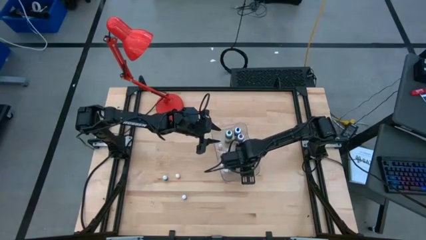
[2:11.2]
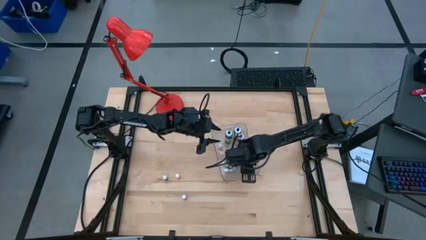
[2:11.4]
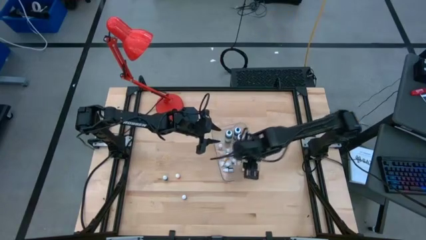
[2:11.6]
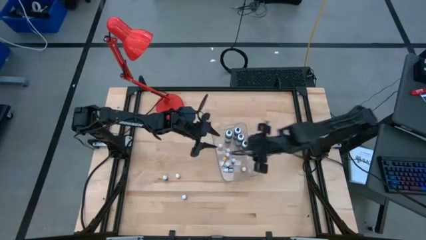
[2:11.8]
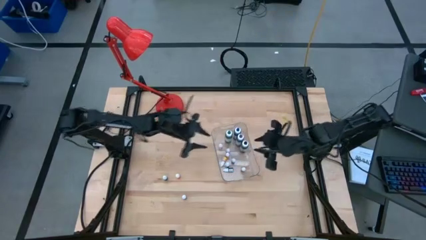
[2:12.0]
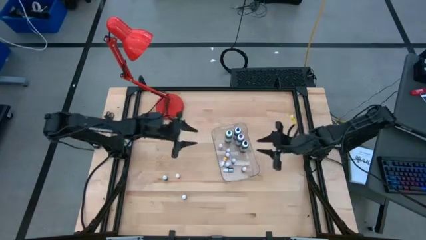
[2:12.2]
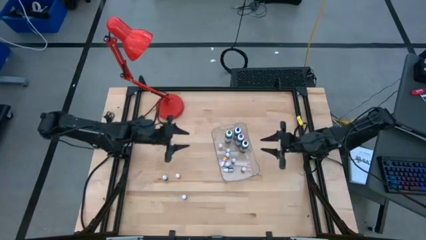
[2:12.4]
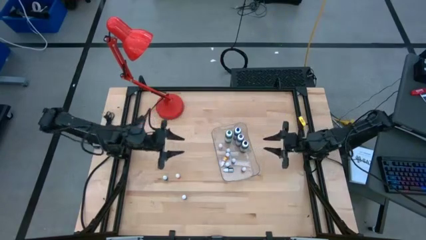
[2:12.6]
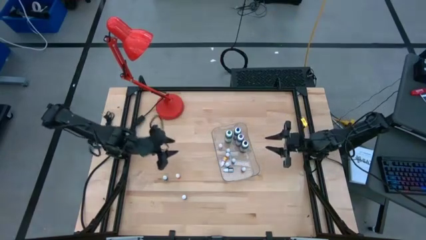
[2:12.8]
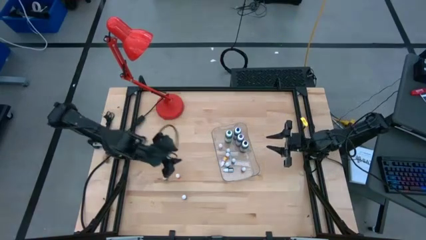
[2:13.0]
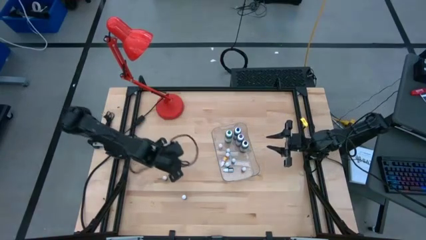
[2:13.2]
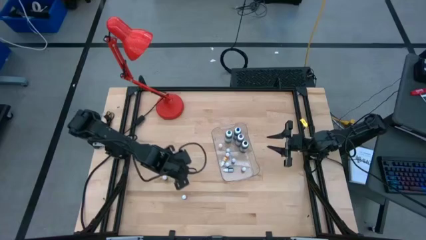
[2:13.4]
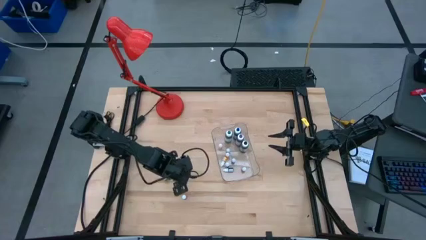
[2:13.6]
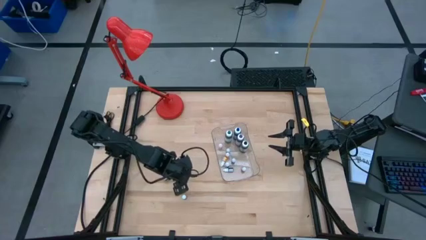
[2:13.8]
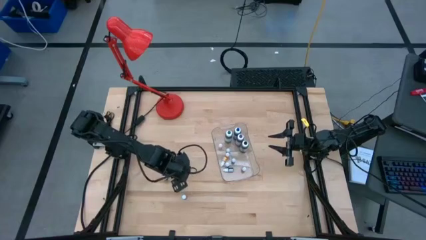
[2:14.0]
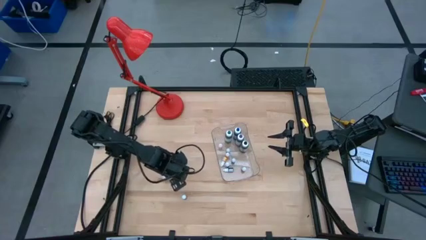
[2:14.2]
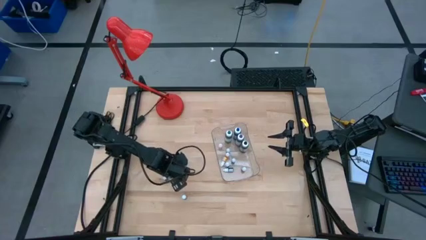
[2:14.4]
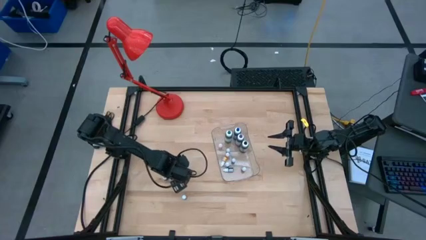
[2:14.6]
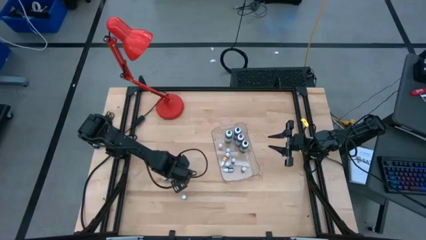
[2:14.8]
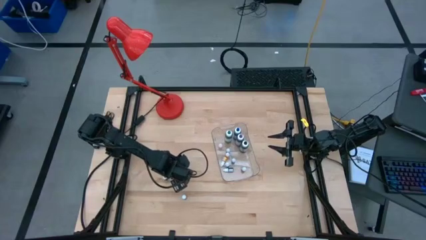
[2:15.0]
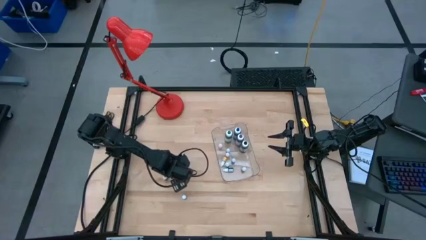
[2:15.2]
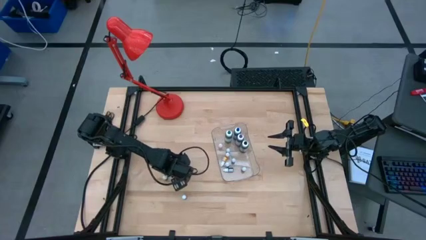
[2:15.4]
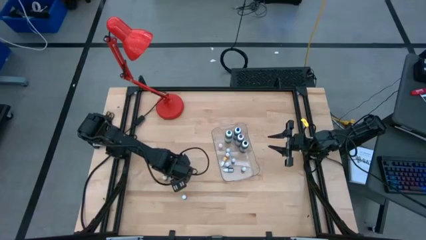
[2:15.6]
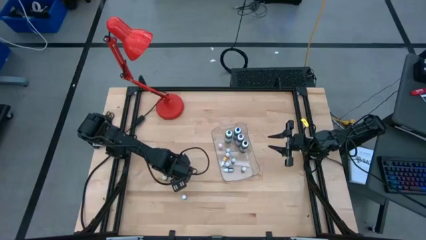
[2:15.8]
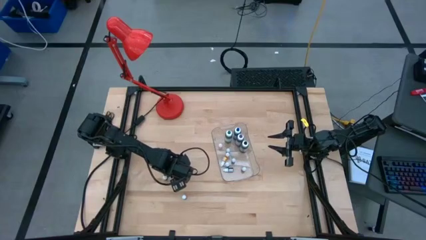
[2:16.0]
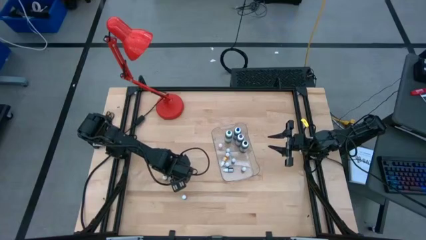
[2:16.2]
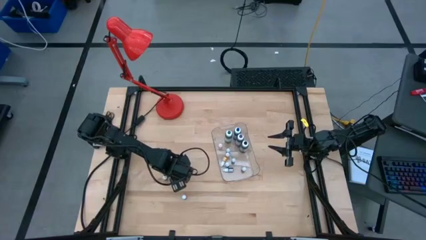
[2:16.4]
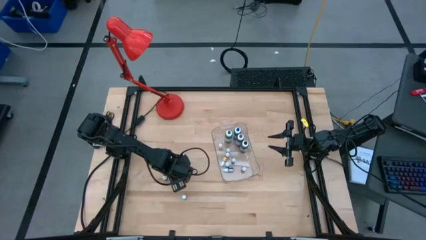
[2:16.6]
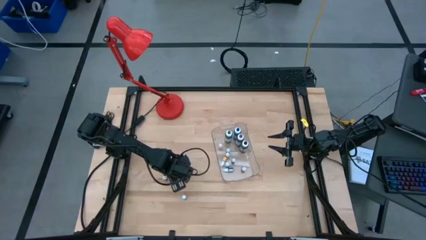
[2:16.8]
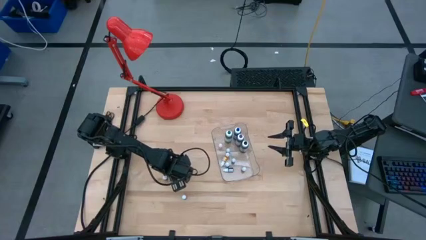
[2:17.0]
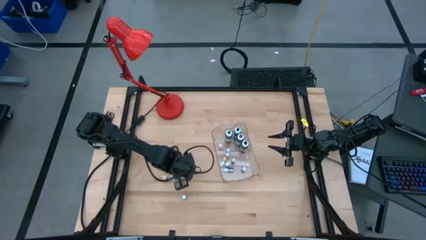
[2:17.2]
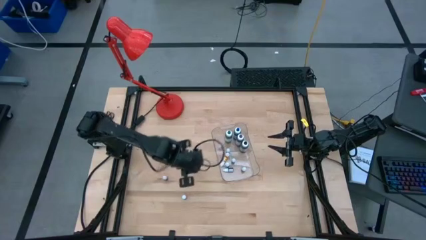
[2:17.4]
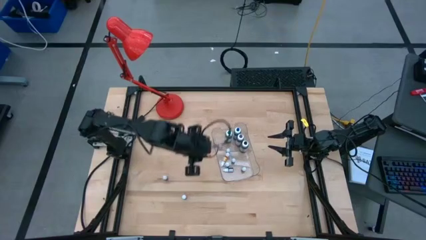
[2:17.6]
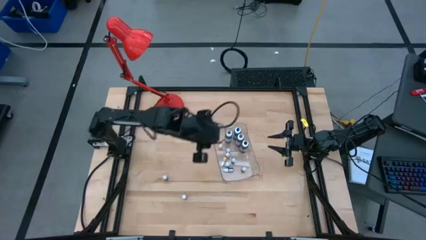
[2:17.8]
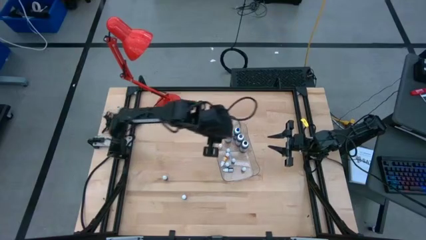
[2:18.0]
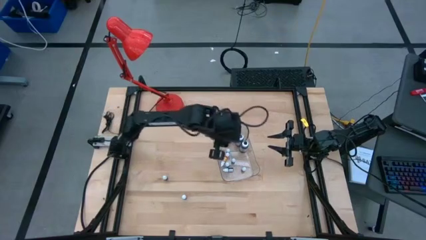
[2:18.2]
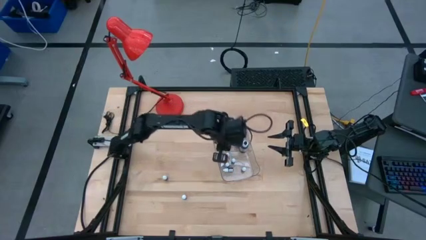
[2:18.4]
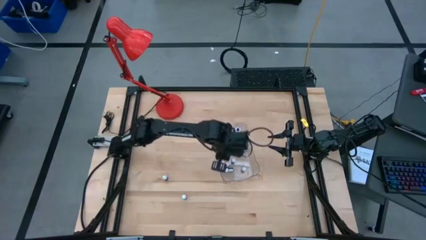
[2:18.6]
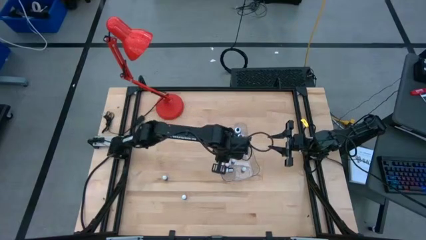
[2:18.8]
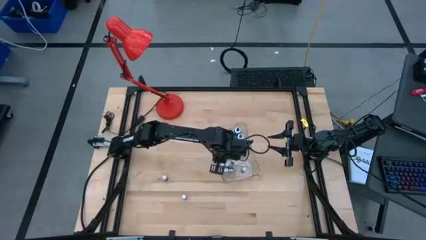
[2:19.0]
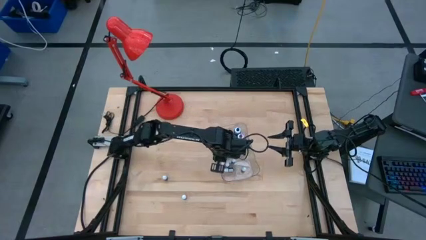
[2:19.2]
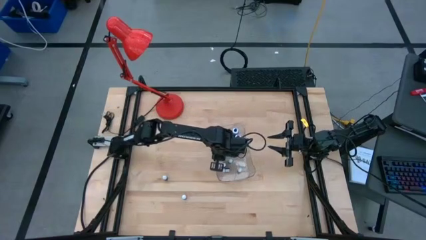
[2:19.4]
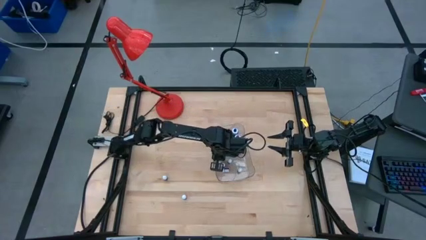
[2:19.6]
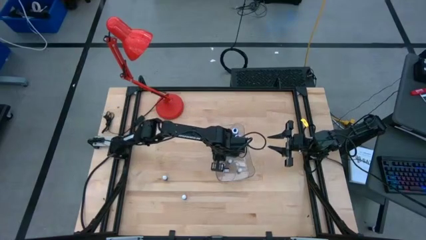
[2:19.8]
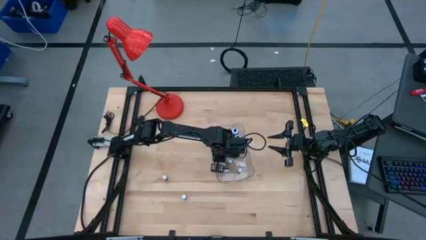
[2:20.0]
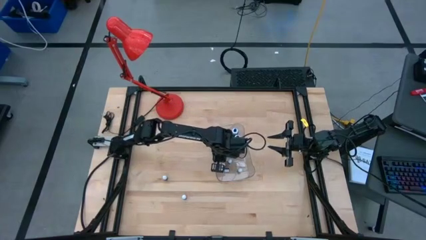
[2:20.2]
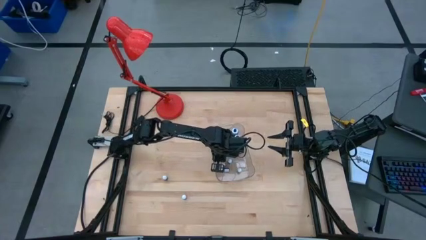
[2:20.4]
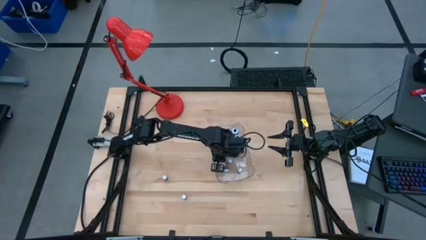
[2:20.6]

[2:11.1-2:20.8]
Task: Pick & Place food coloring
Put the orange food coloring bottle into the transparent container

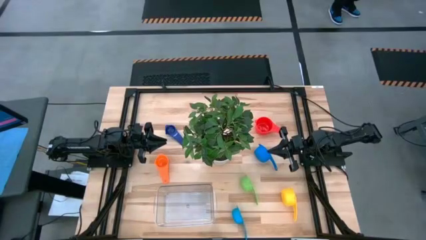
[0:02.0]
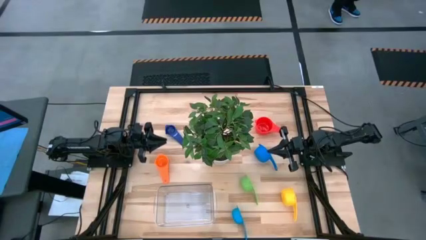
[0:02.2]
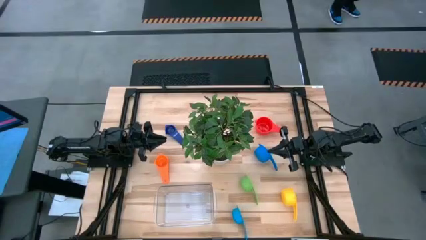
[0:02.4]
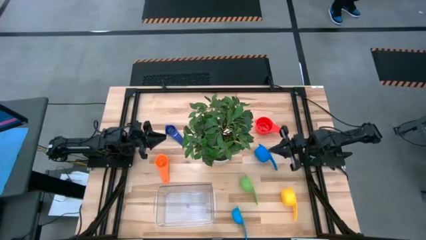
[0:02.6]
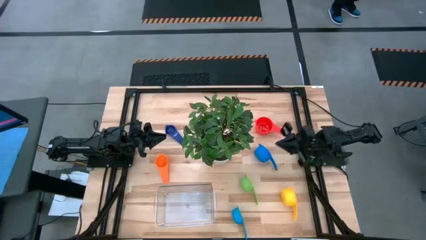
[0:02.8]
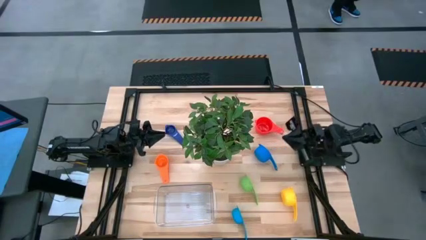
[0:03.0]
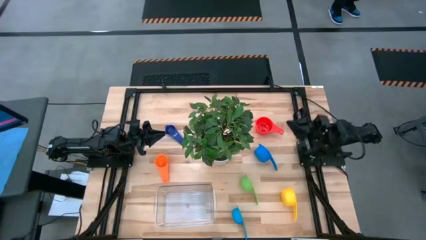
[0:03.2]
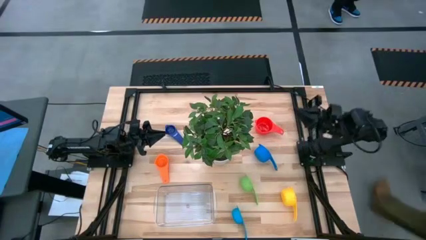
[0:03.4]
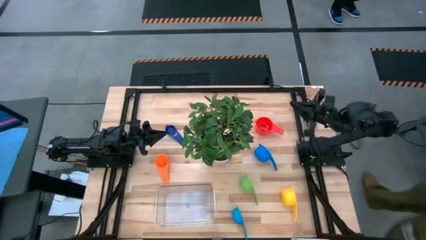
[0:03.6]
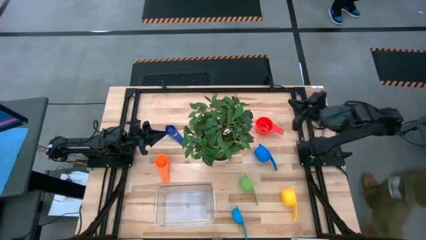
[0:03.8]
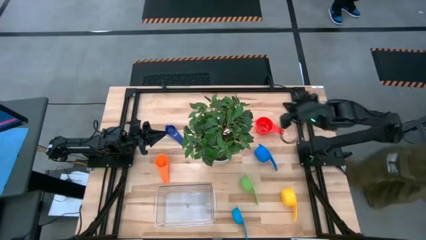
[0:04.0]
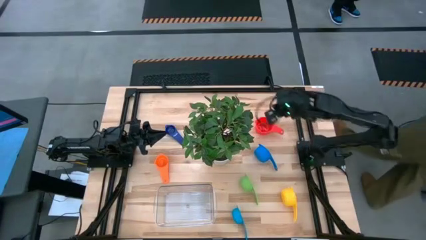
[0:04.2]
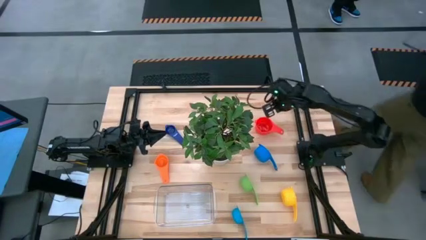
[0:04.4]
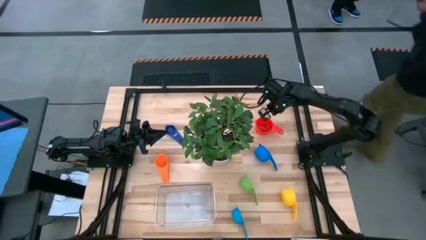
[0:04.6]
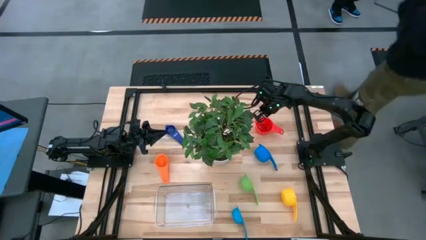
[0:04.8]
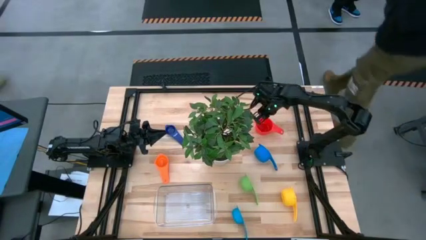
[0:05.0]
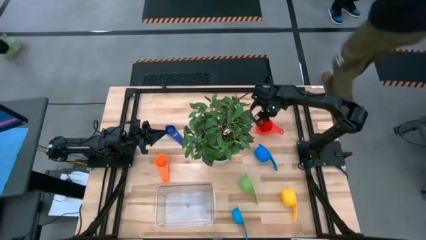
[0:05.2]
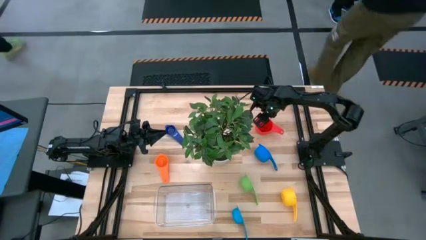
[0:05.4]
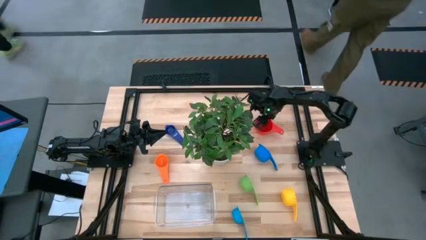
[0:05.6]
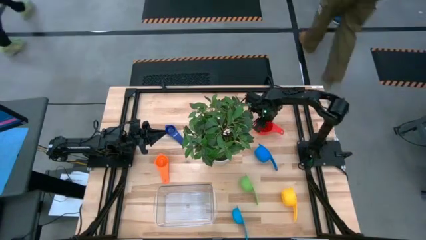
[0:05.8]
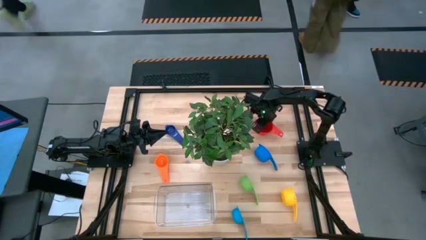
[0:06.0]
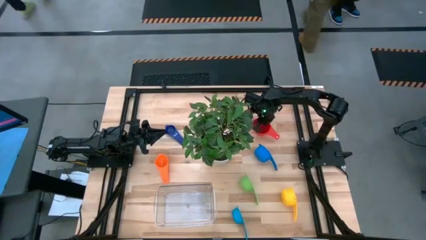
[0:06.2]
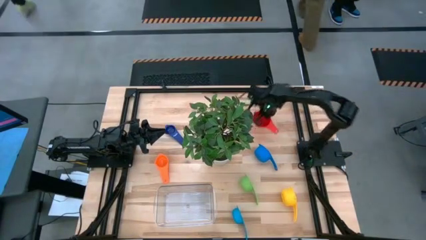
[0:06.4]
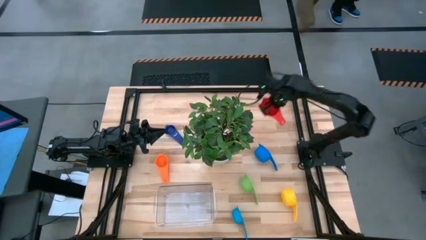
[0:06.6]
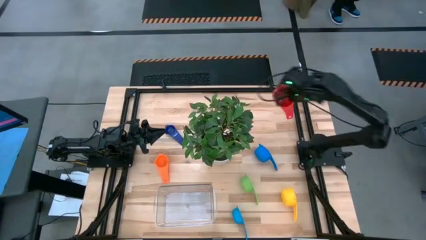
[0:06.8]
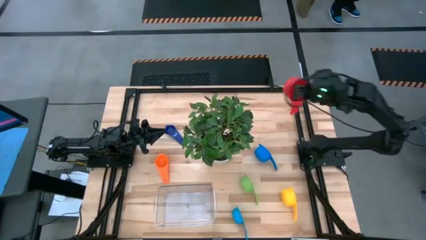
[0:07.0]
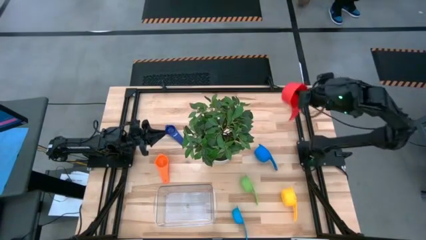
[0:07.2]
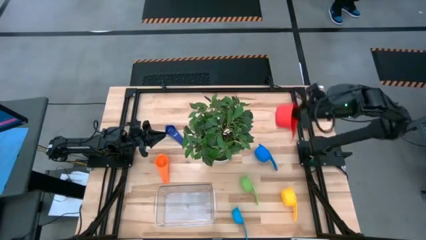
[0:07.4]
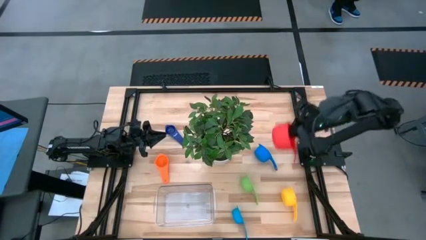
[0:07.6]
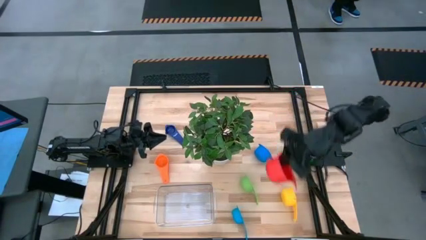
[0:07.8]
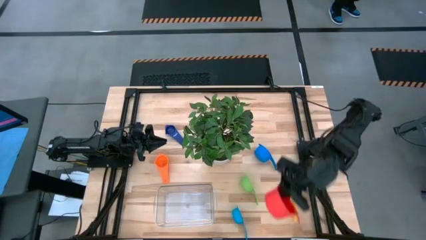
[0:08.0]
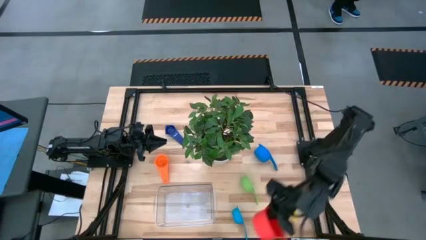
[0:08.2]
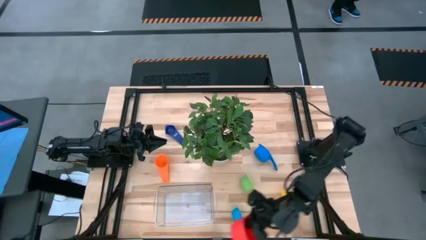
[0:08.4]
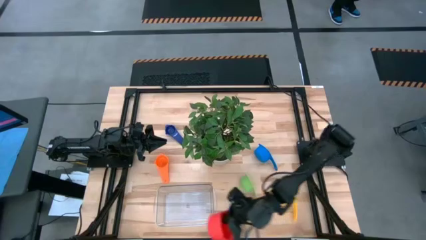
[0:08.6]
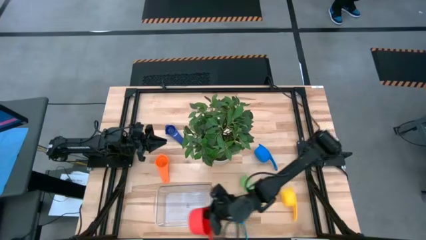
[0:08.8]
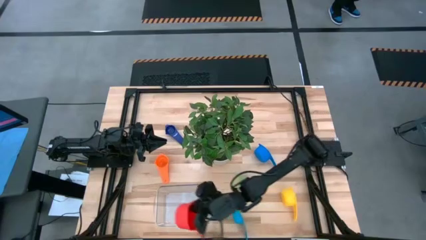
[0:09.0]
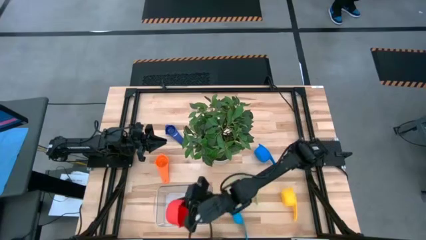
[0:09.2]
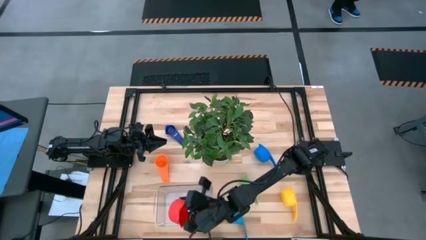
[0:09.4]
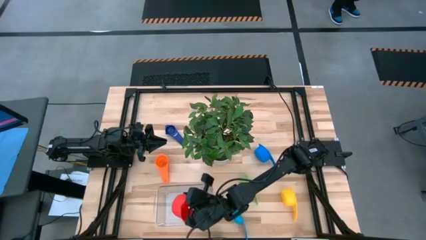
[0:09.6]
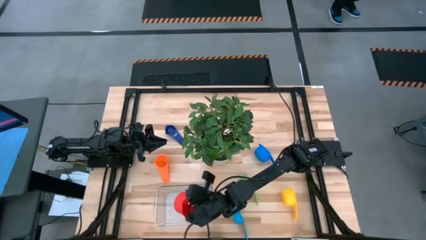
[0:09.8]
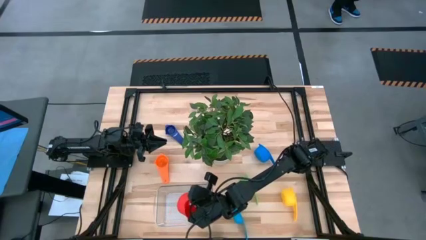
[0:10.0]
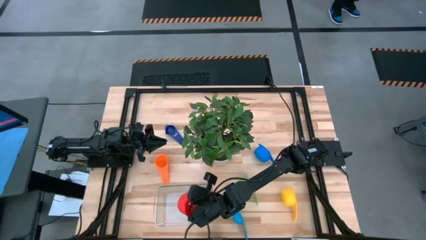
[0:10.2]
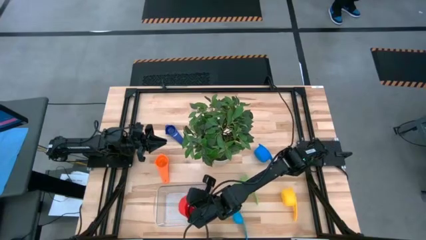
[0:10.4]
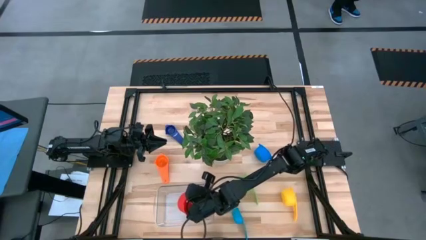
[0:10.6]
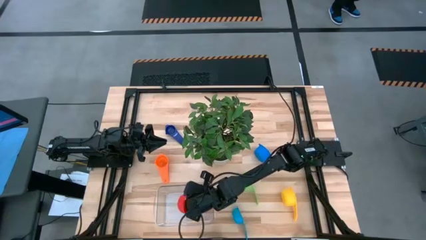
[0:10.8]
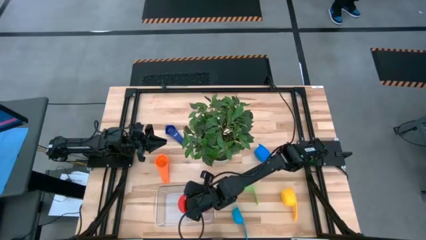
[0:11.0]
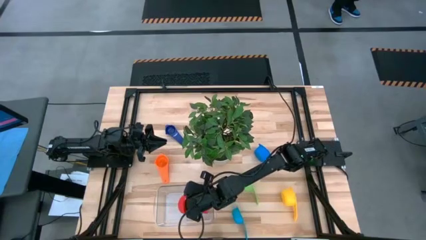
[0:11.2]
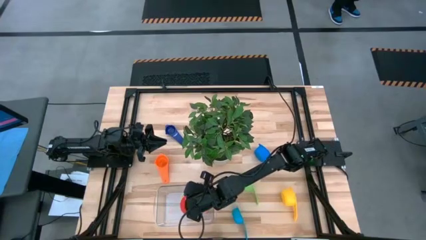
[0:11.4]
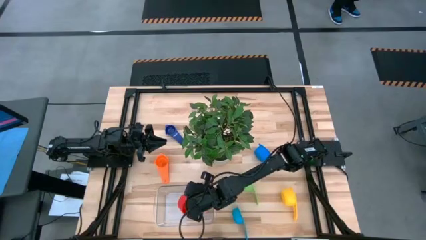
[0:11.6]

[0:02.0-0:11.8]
Task: Nest measuring cups in basket
Put the red measuring cup into the transparent bin
